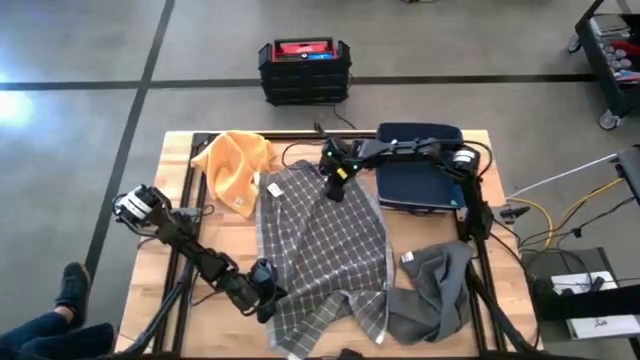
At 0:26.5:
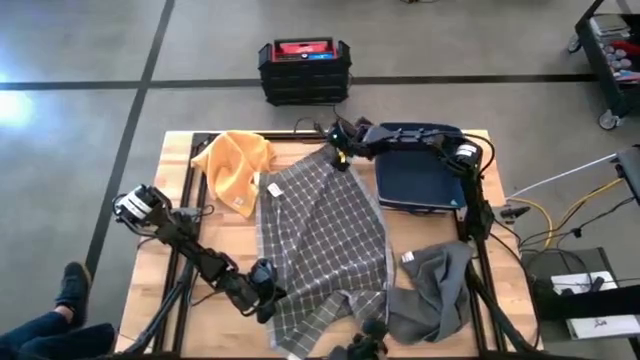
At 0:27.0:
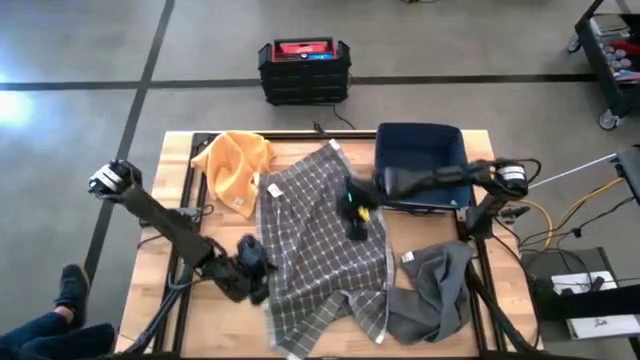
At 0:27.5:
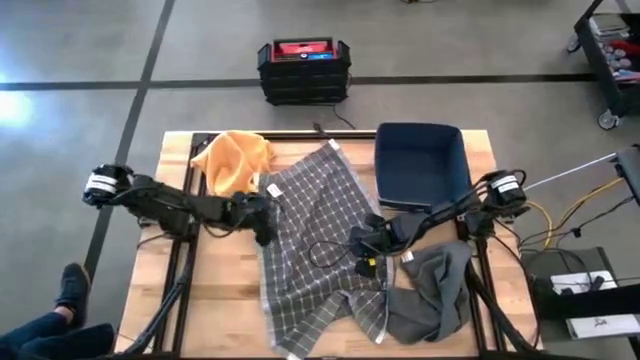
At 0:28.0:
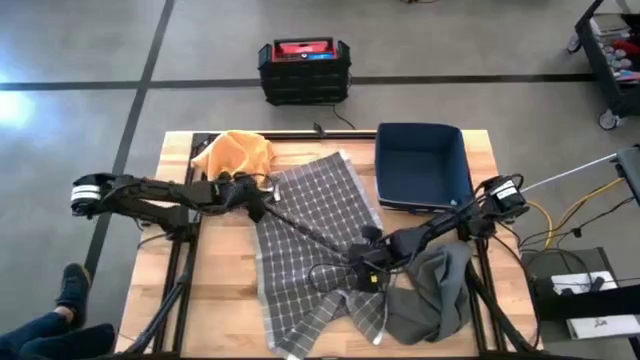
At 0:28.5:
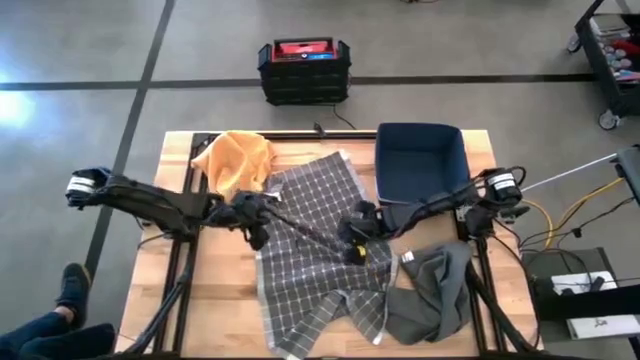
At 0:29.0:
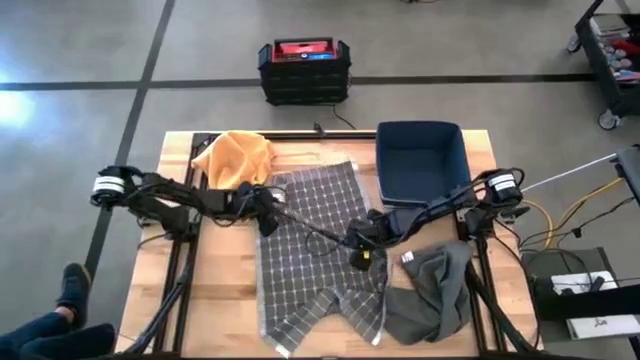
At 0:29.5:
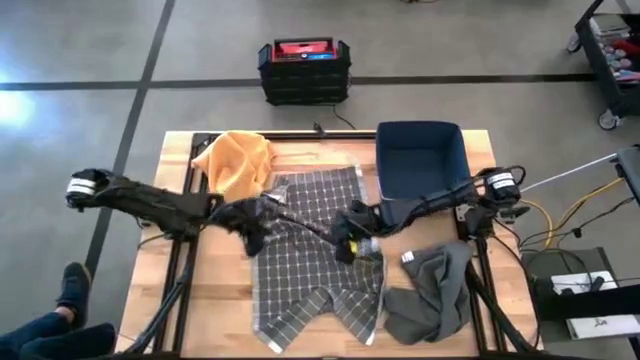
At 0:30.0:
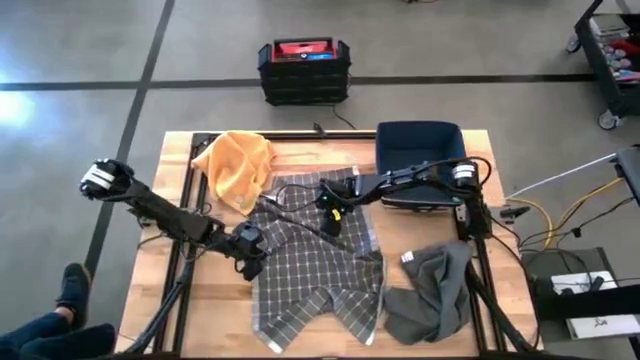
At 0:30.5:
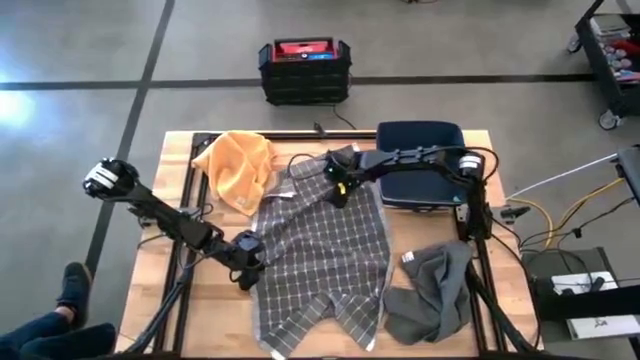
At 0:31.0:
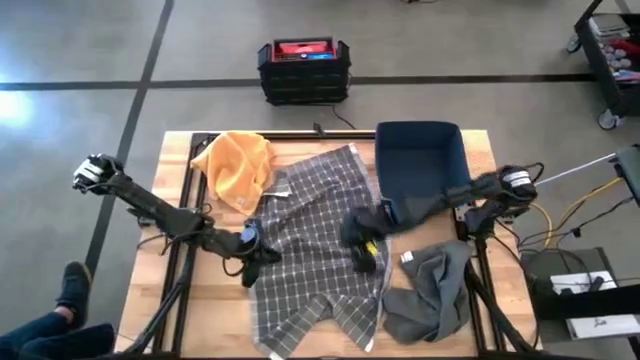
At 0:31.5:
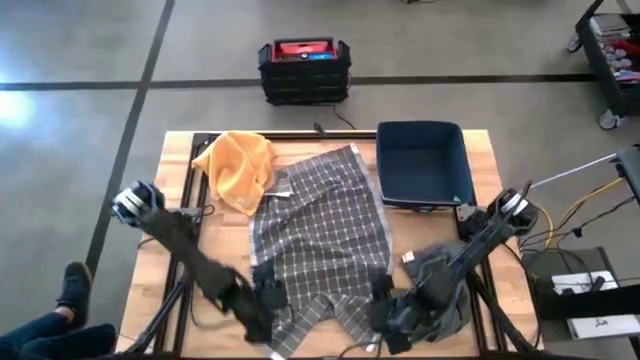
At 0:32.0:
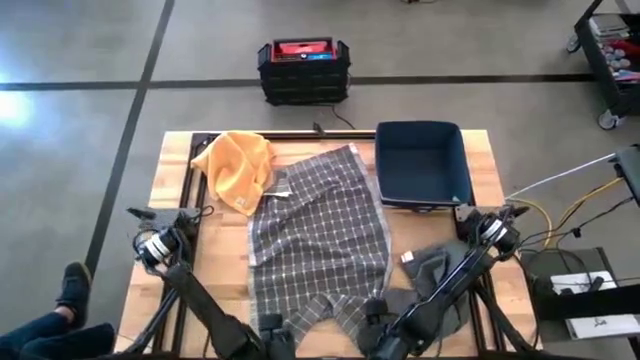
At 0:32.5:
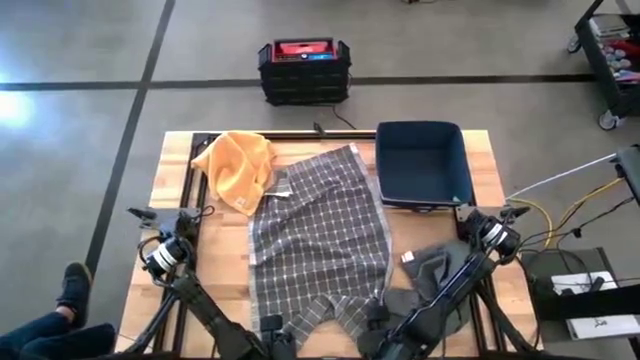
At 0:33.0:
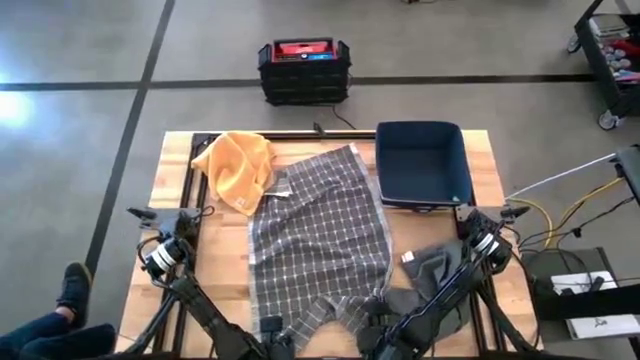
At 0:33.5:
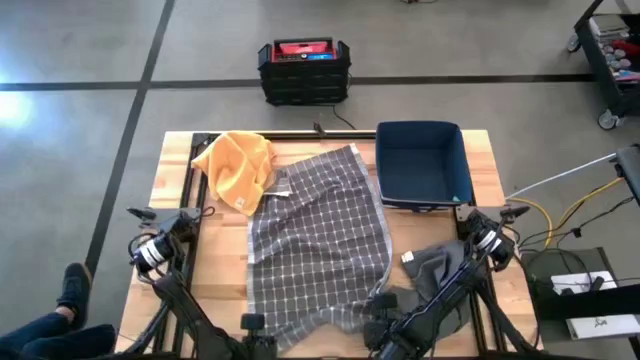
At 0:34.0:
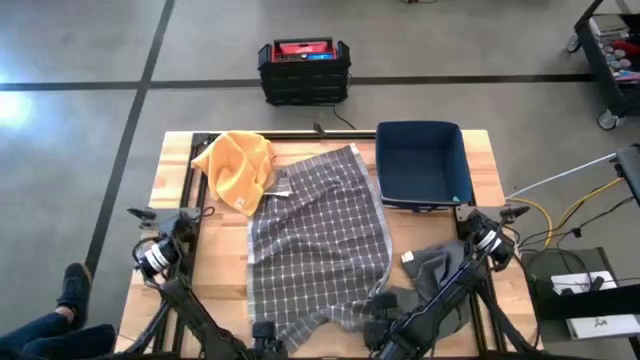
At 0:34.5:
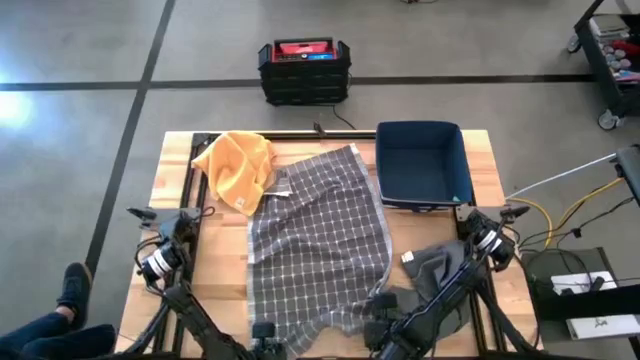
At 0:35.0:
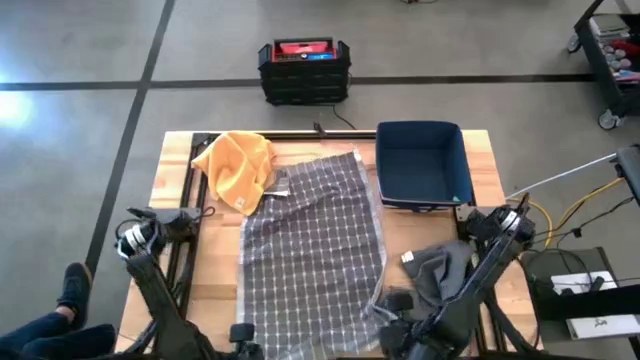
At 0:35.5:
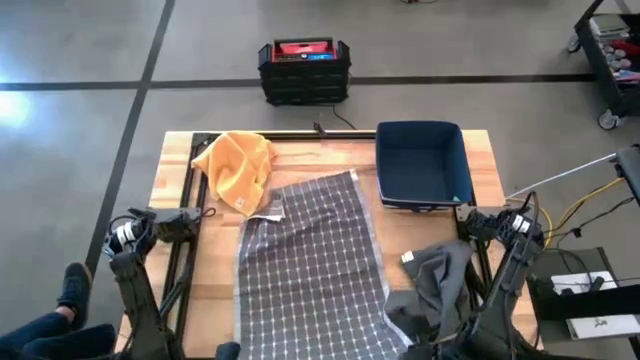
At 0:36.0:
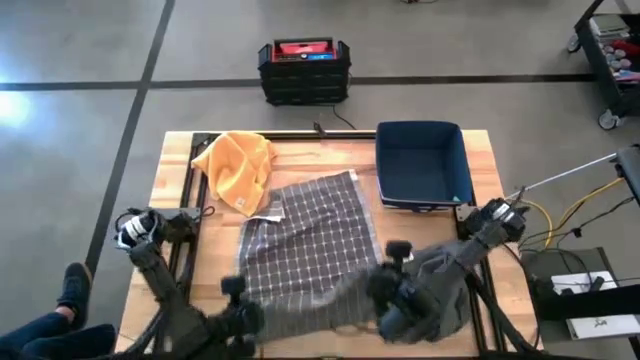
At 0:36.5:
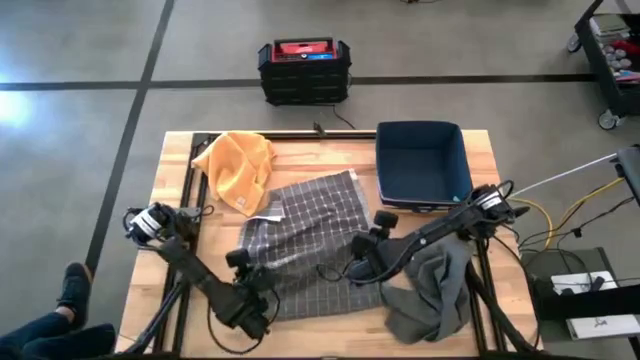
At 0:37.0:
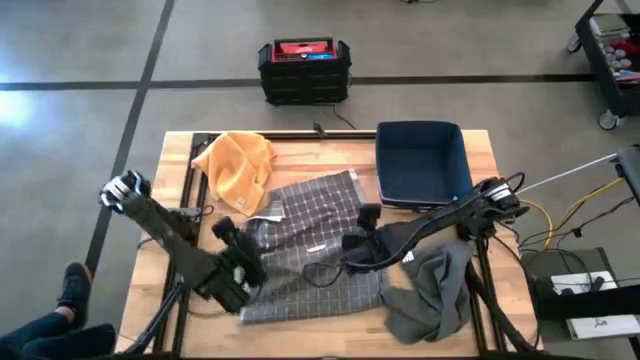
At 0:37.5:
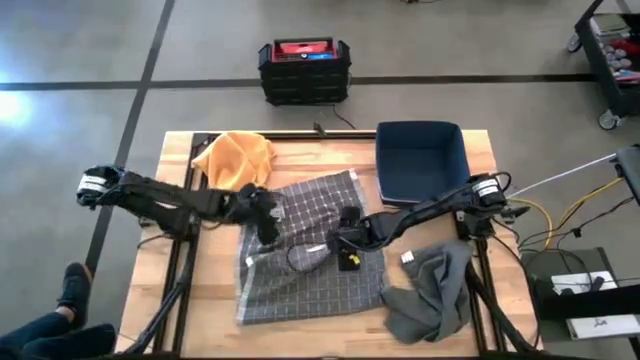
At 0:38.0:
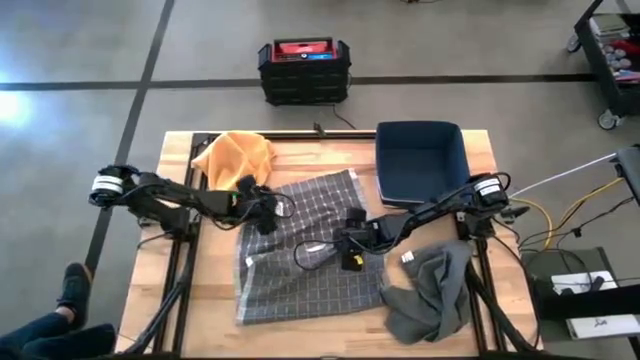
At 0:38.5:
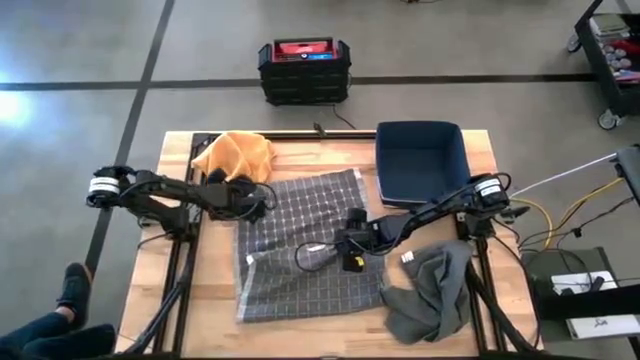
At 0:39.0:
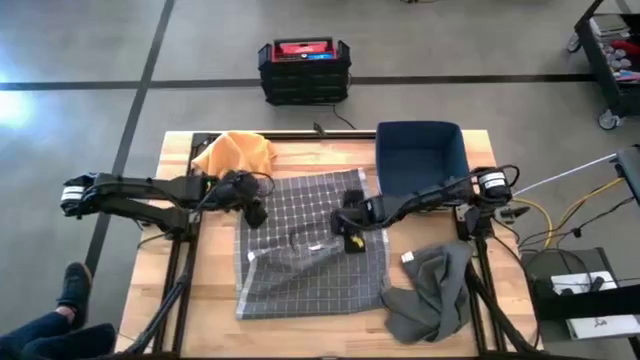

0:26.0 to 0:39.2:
Task: Fold towel
Fold the gray patterned kitchen towel

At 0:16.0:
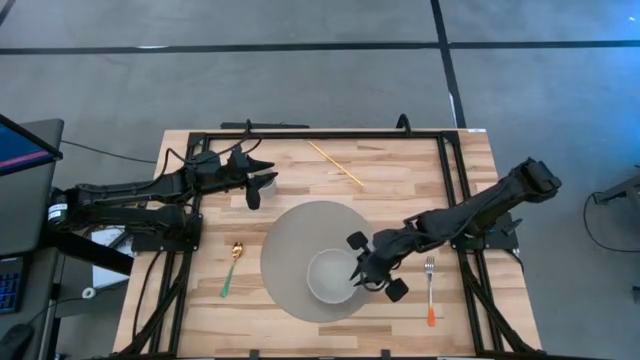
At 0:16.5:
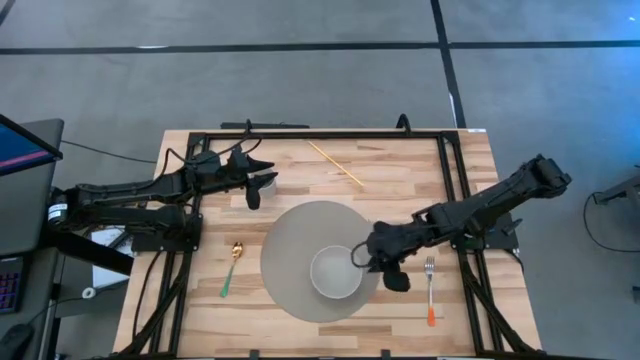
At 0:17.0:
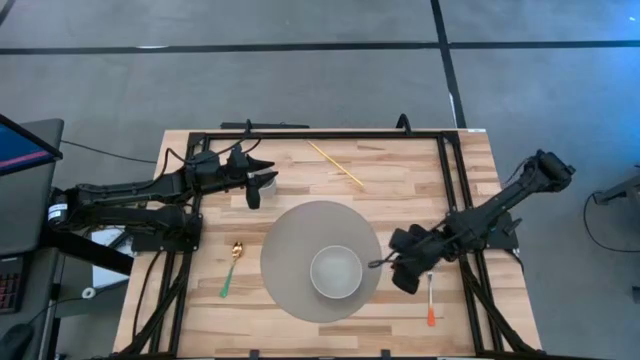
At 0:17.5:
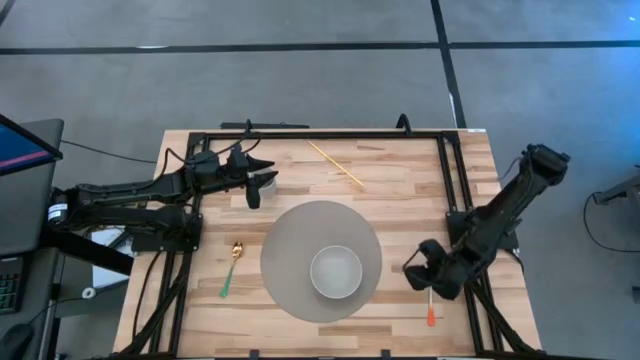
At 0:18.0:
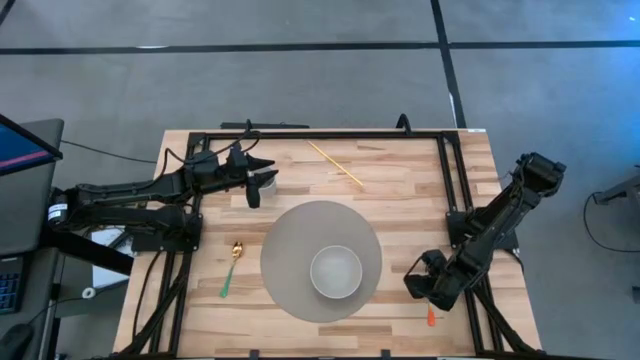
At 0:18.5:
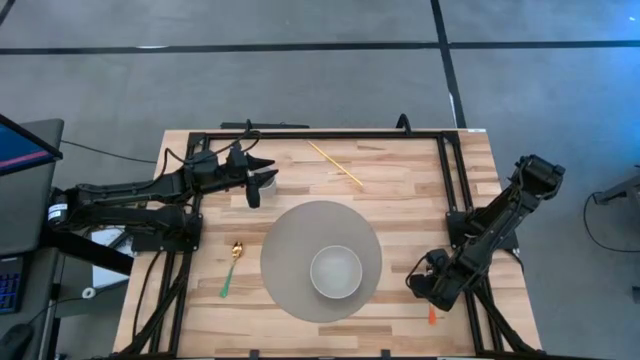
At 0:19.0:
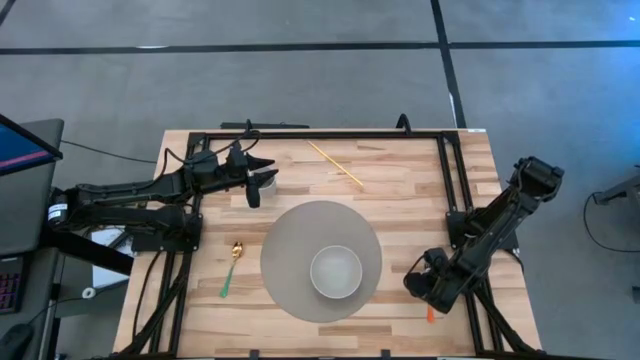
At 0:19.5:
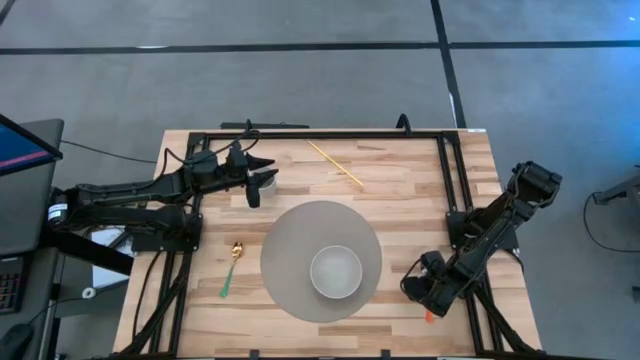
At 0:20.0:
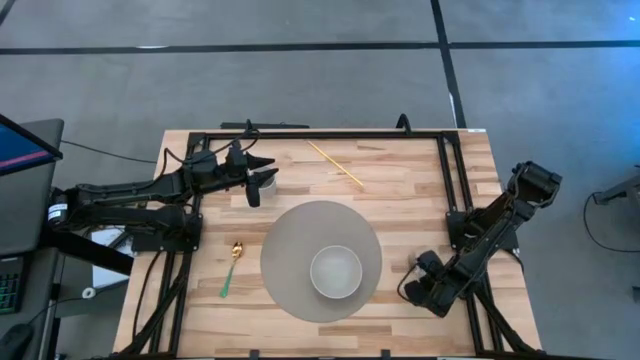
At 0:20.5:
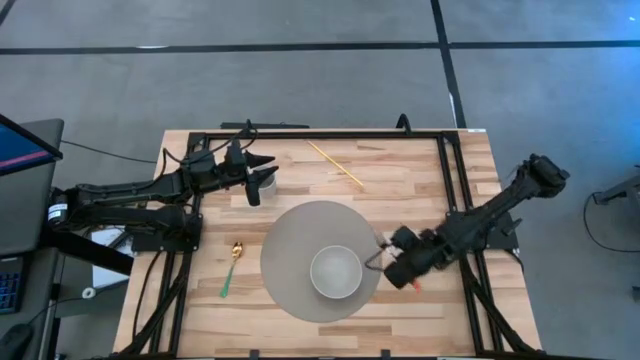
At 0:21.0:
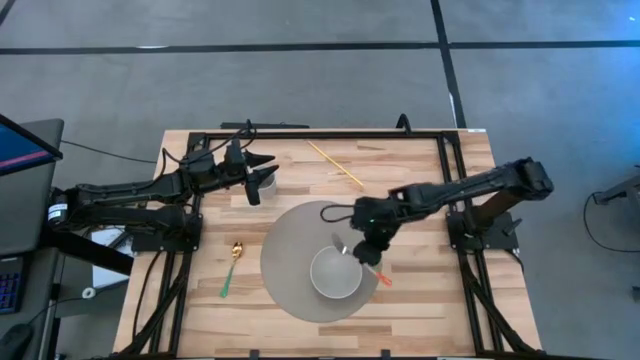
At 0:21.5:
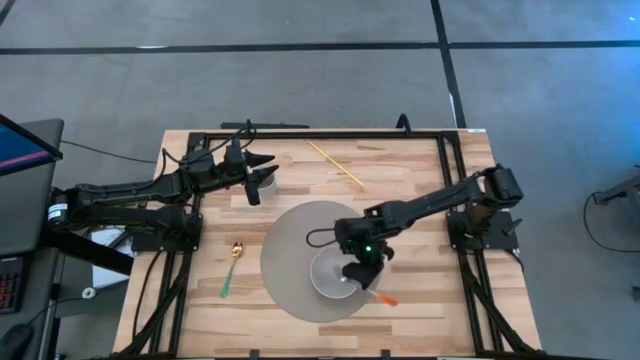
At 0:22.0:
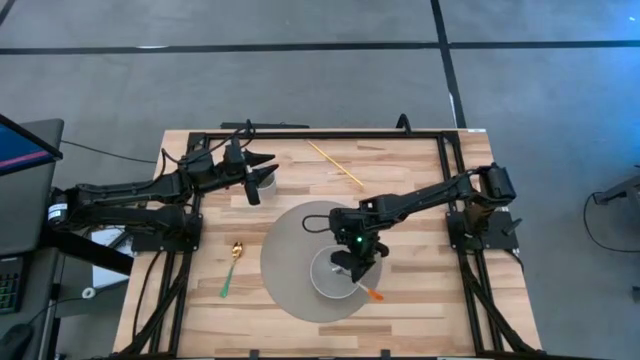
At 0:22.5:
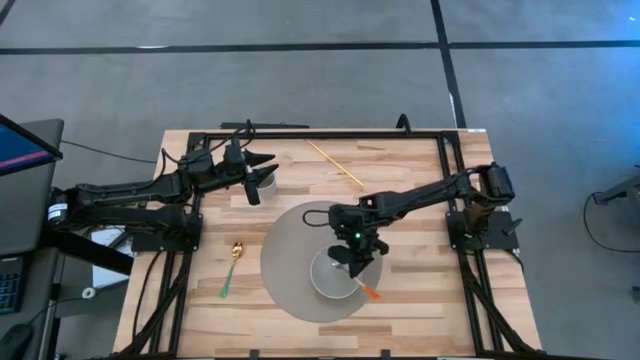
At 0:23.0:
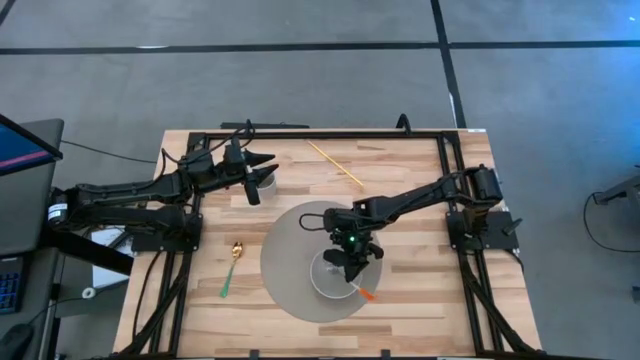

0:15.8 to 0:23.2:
Task: Pick & Place Utensil
Put the orange fork into the gray bowl
